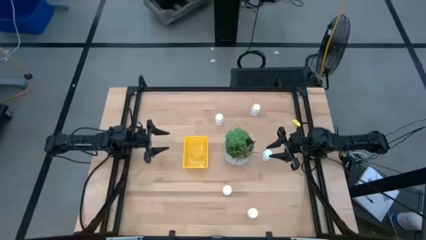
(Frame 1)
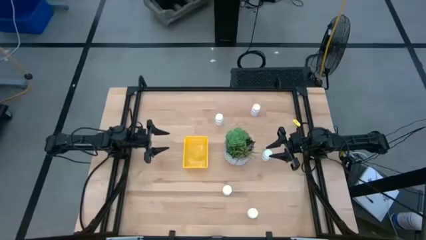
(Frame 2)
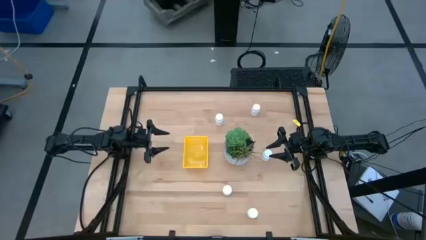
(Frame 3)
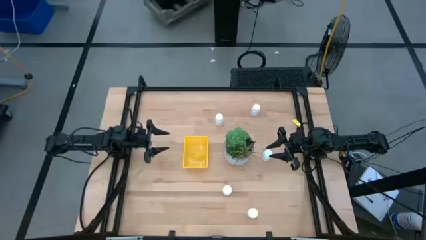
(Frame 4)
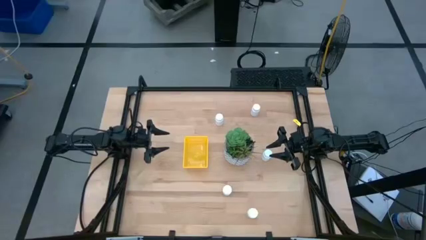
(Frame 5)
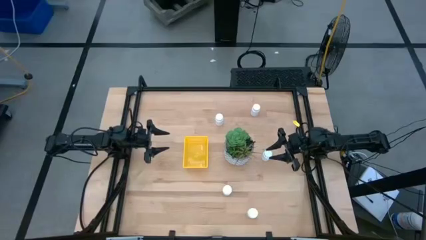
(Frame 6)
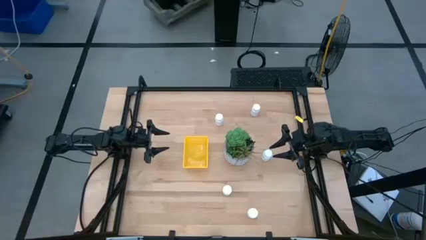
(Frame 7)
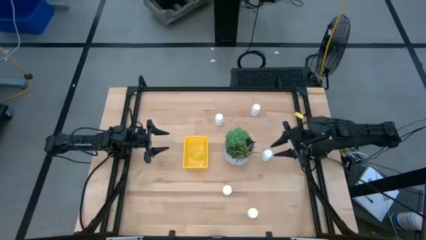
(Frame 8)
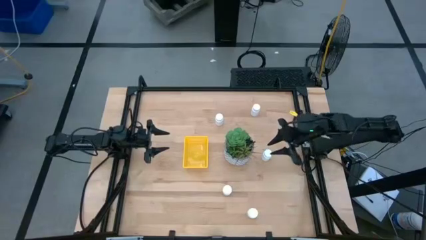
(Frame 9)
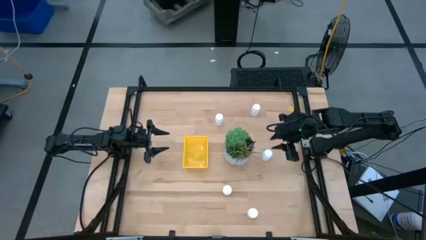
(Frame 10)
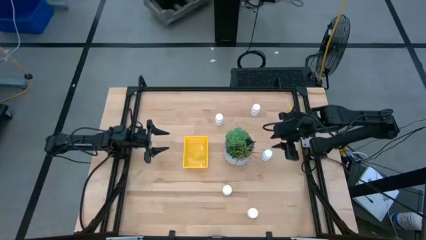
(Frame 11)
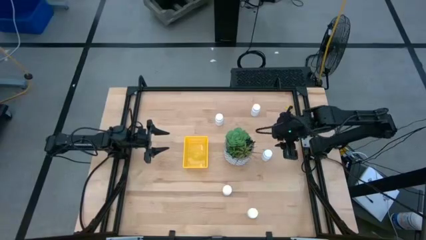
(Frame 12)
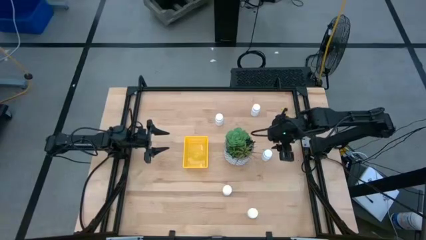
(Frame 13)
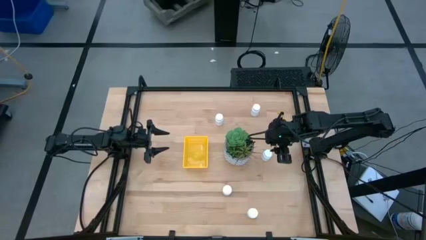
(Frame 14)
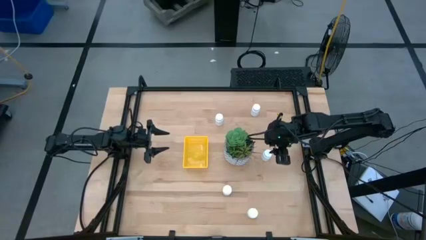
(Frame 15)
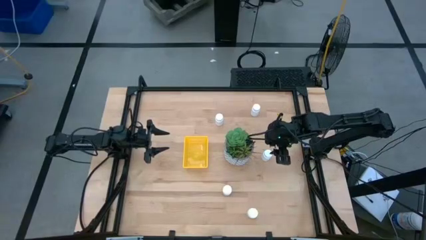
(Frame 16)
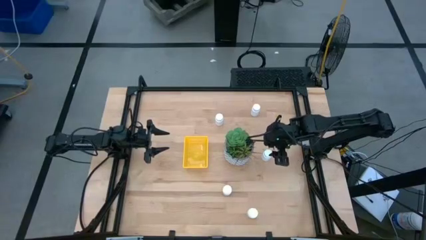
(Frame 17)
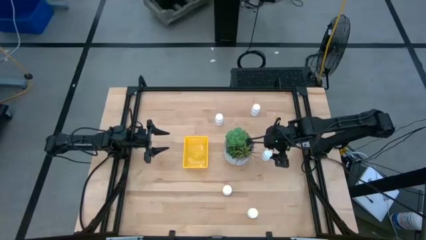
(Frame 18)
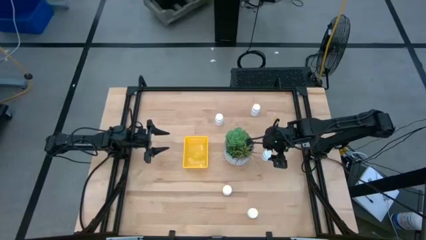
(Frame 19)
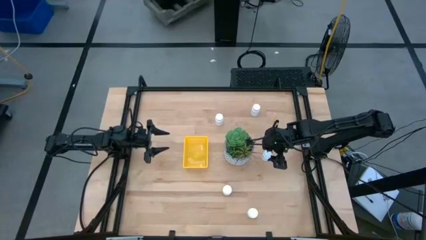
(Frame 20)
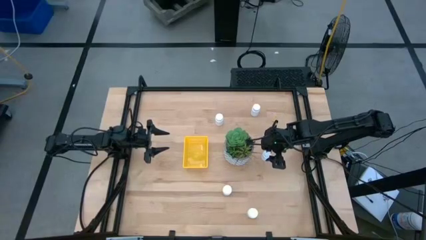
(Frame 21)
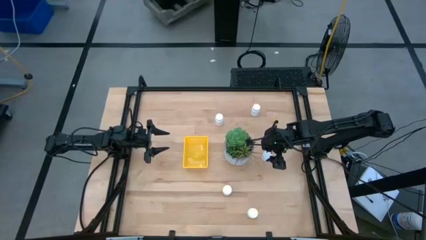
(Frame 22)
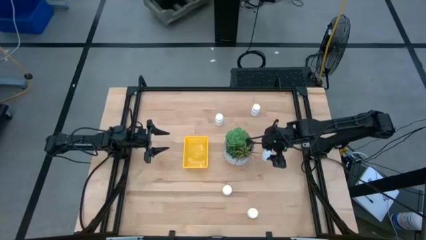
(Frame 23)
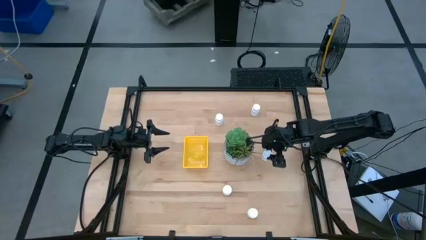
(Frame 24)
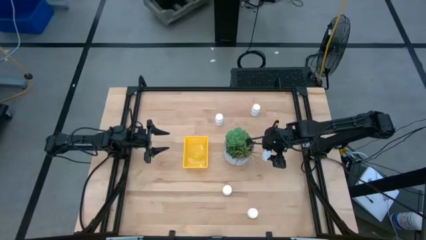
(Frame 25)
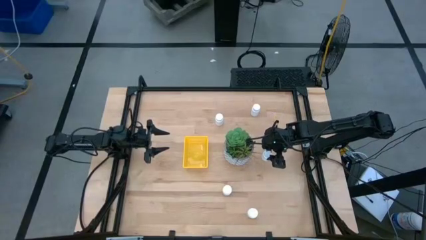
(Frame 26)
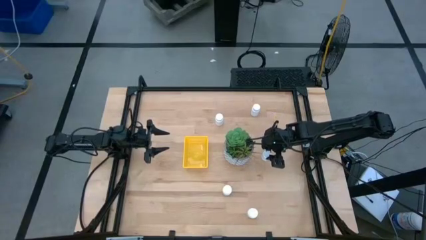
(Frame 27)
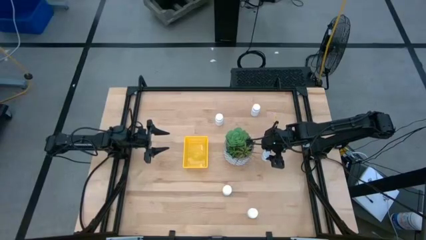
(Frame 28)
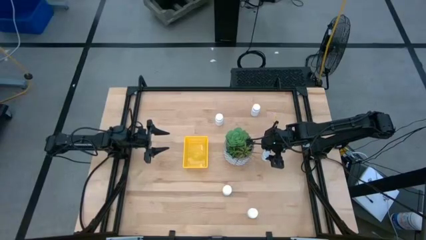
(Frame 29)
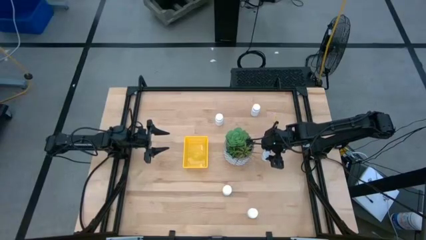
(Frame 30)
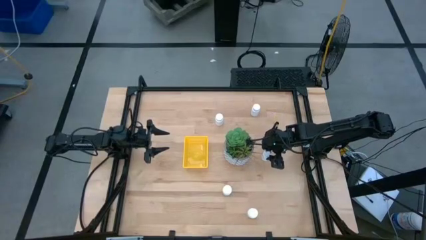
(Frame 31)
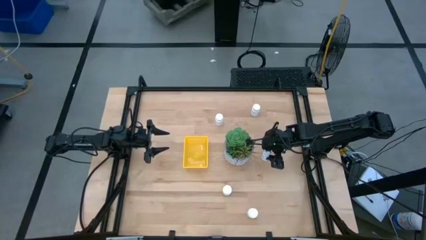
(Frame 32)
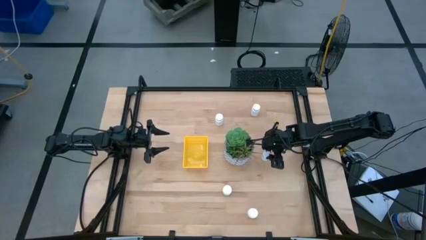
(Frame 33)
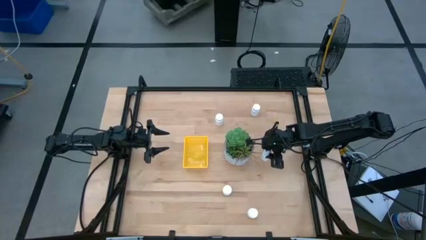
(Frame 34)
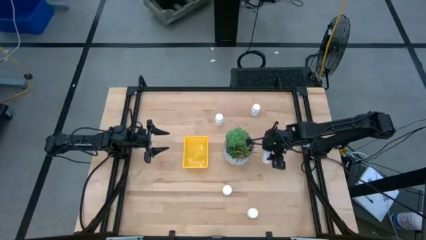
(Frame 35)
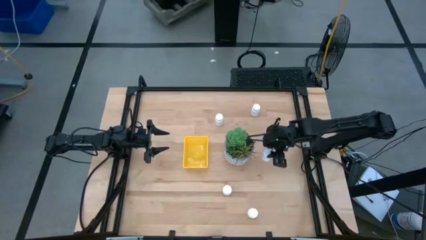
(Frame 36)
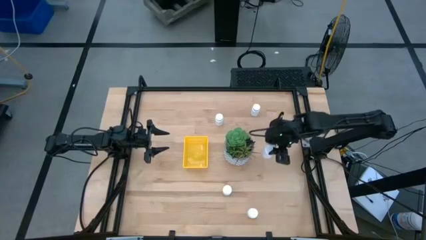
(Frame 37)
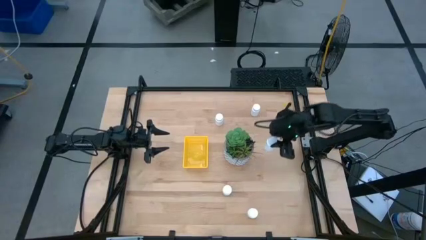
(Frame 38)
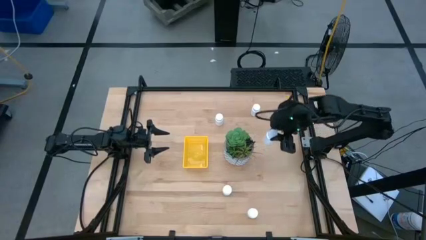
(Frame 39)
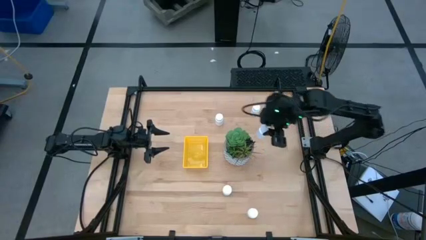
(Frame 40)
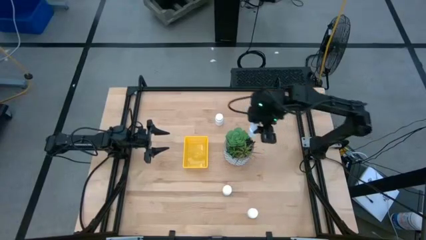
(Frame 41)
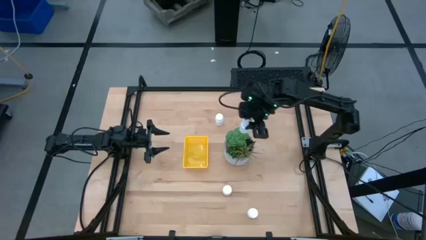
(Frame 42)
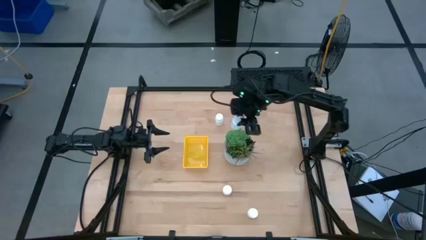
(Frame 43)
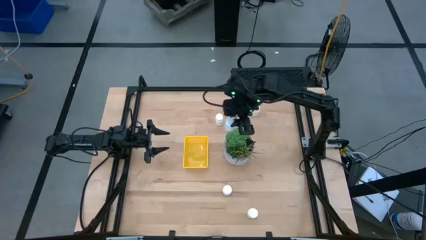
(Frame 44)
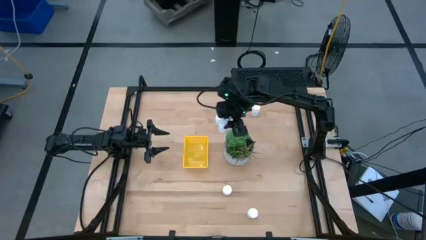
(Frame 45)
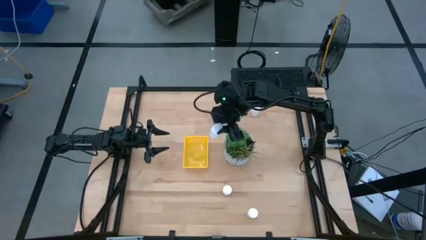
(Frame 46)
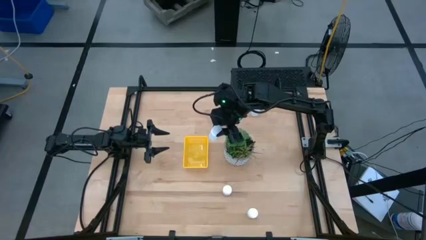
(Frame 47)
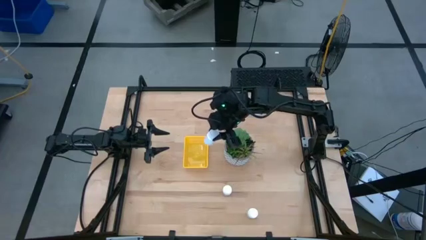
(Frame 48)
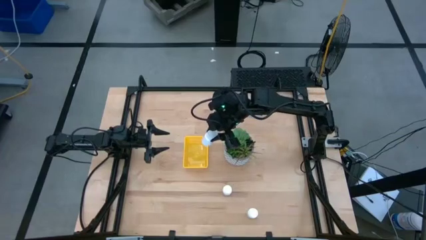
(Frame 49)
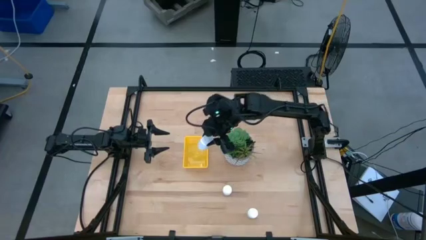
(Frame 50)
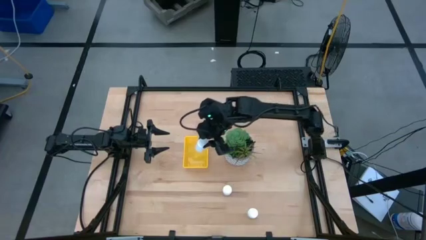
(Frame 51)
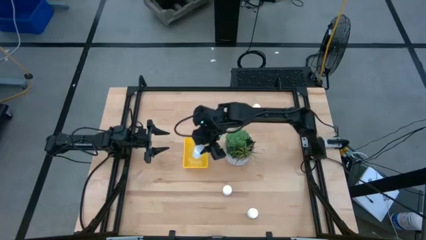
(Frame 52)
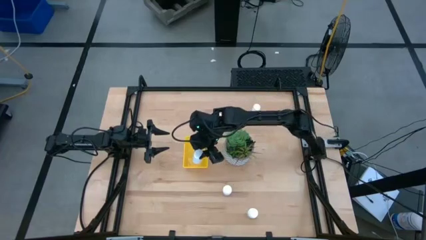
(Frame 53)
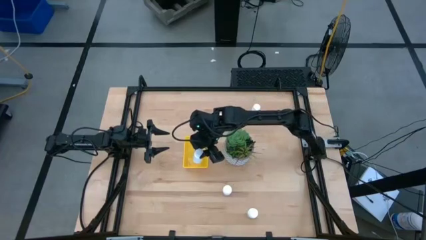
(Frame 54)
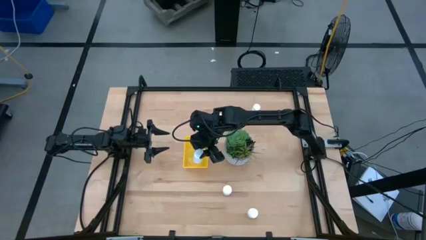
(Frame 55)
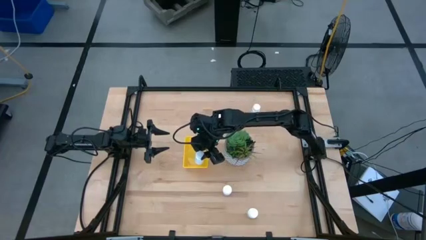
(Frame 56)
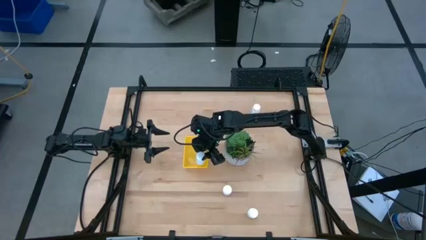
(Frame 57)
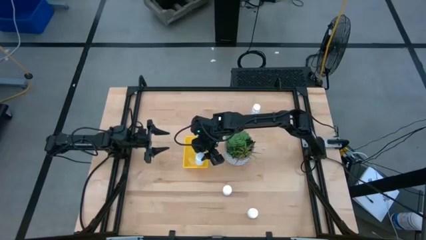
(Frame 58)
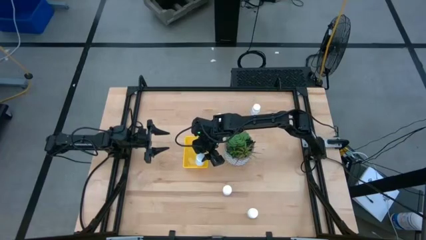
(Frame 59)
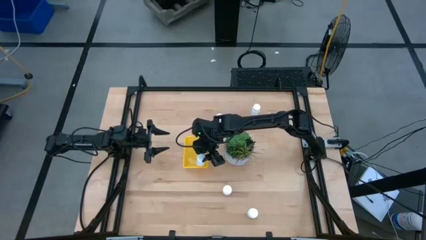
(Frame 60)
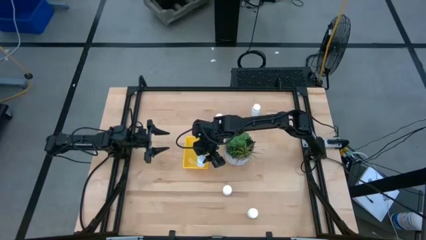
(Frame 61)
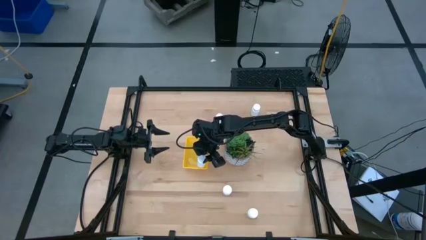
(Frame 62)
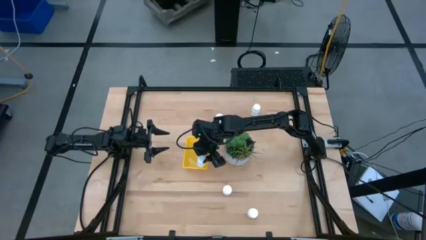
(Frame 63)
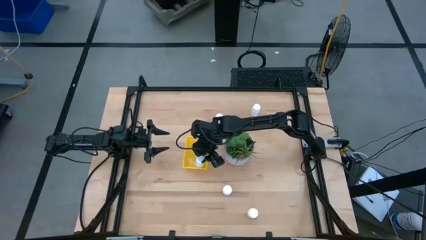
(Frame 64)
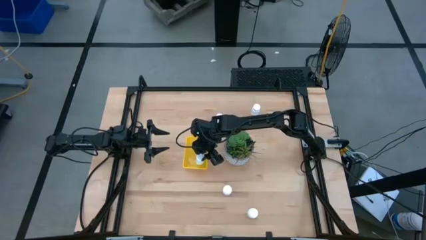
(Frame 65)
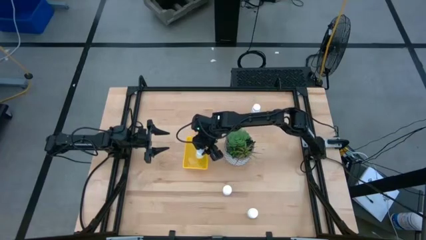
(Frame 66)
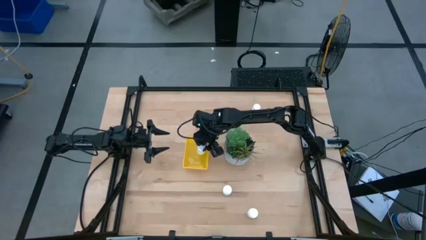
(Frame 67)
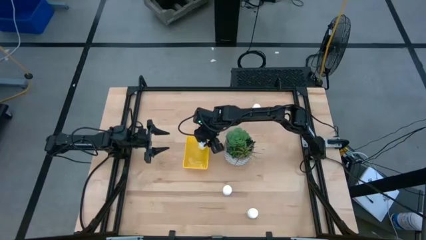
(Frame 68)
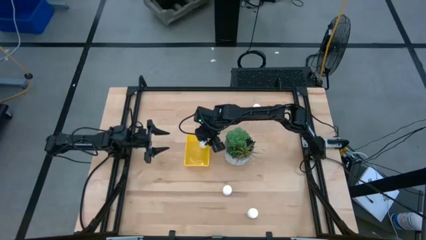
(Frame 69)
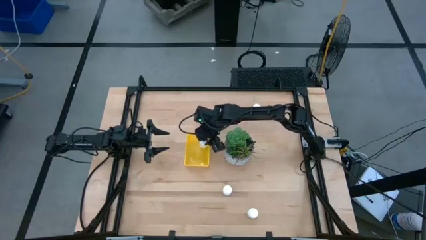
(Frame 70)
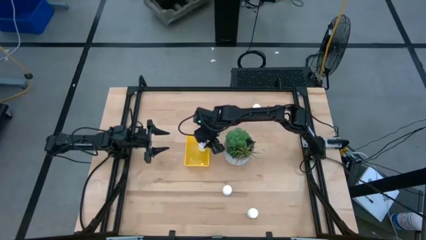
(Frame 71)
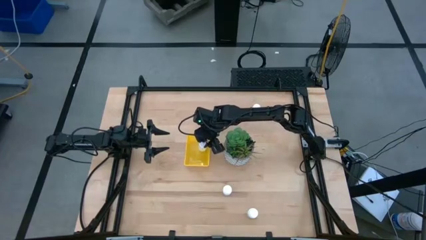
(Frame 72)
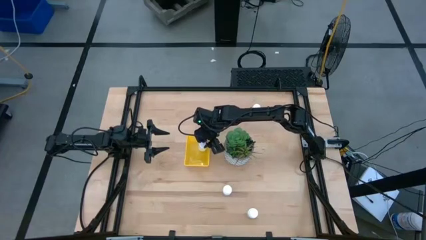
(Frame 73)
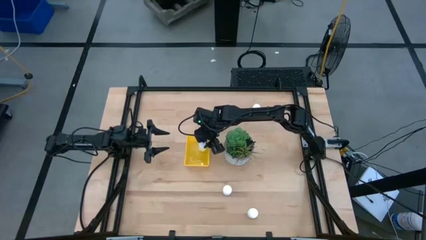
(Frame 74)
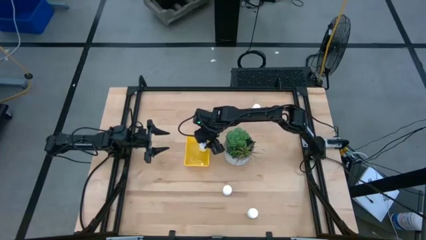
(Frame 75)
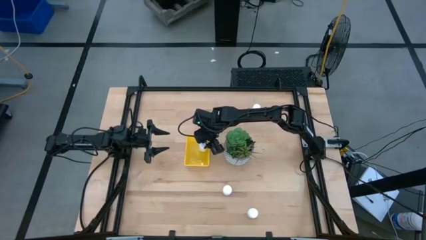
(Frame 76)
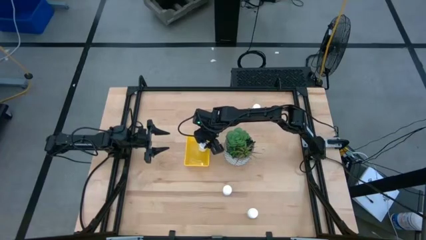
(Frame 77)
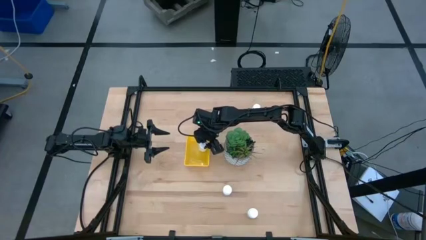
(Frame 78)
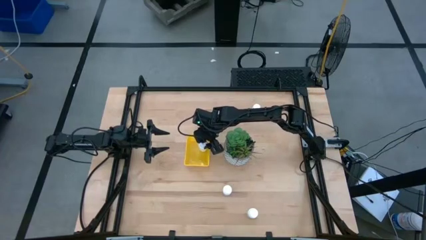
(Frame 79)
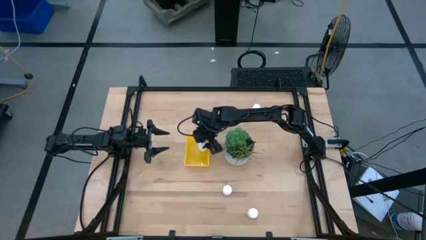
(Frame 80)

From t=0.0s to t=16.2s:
Task: Pick and place pill bottles into a basket
Put the white medicine bottle into the yellow basket
